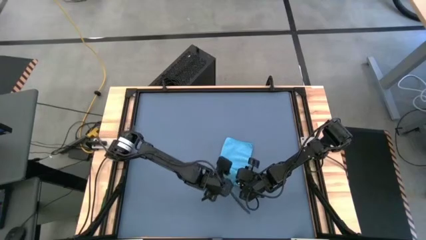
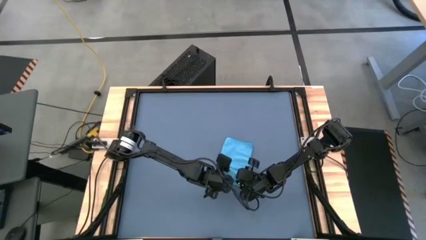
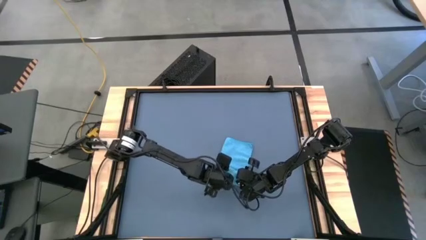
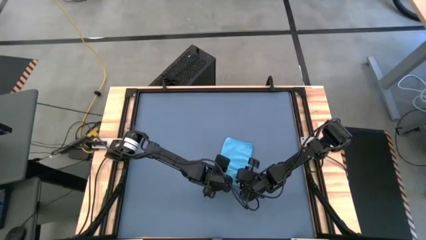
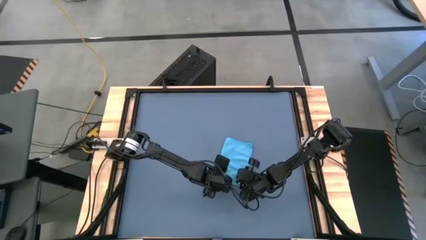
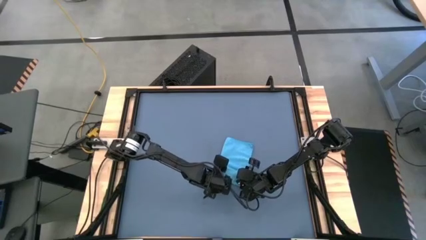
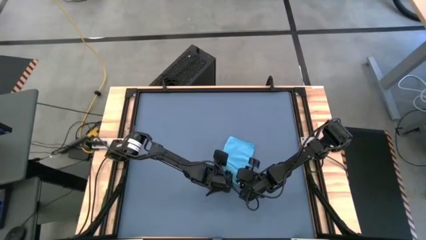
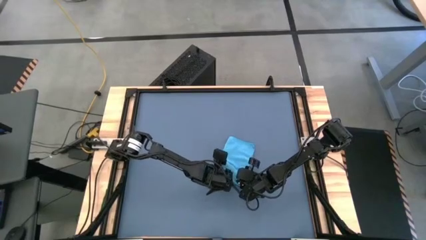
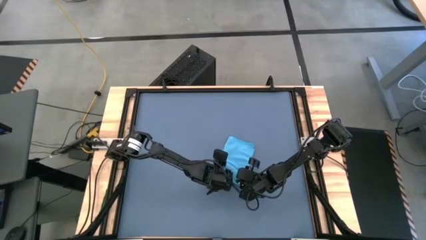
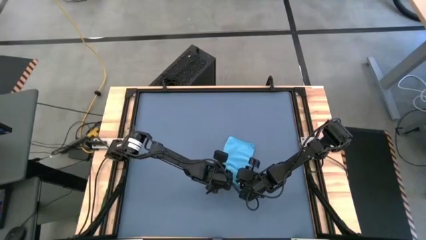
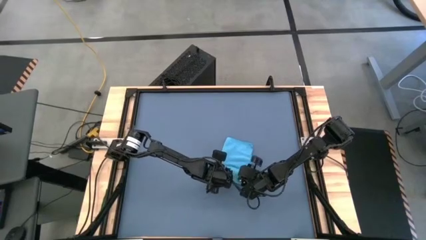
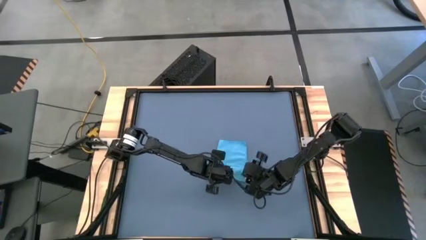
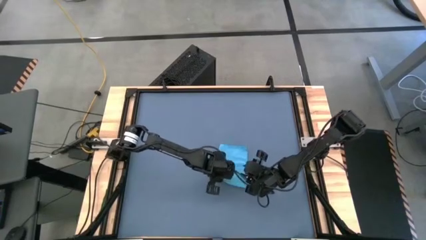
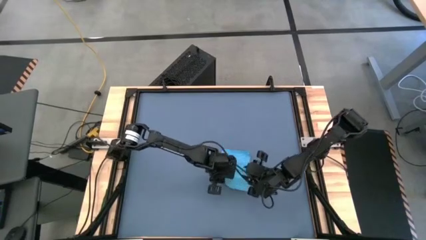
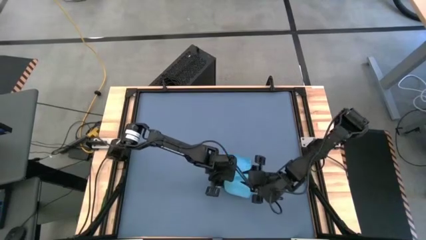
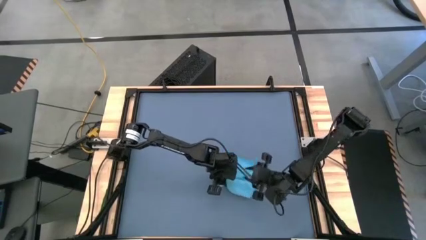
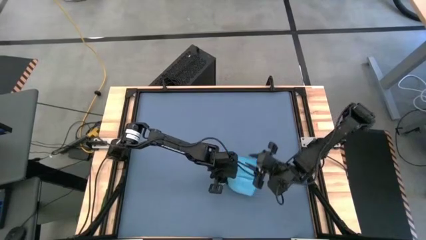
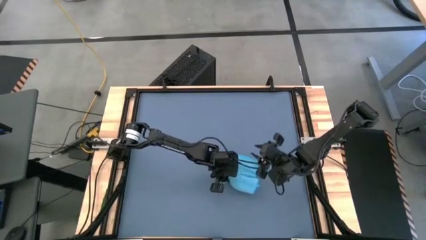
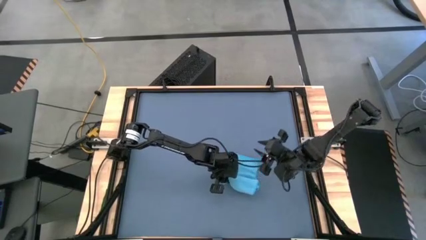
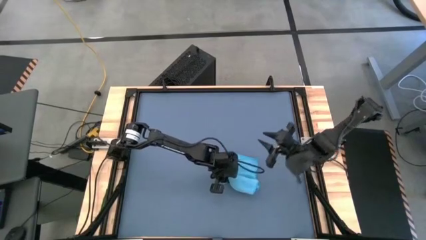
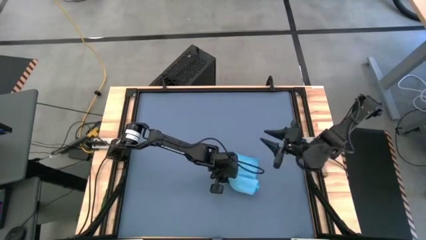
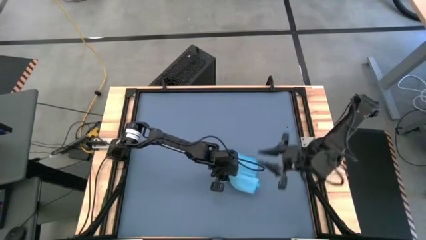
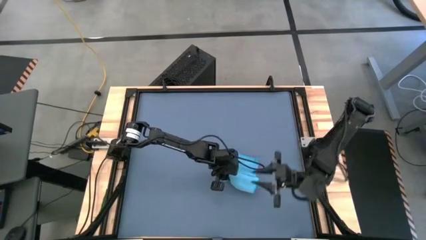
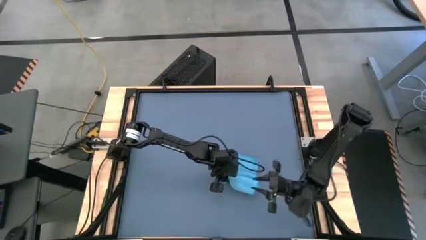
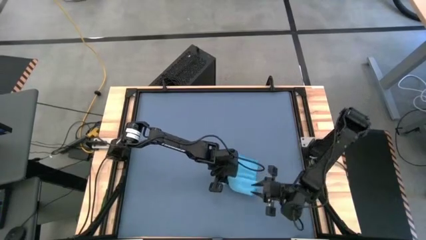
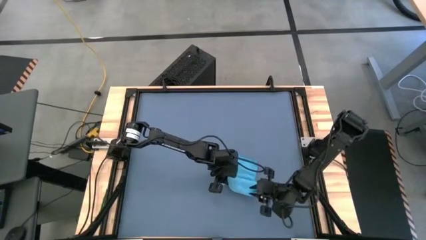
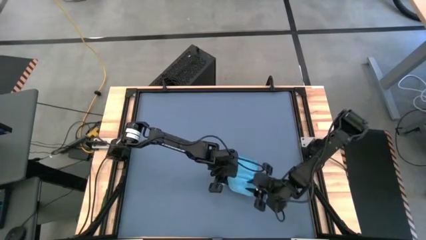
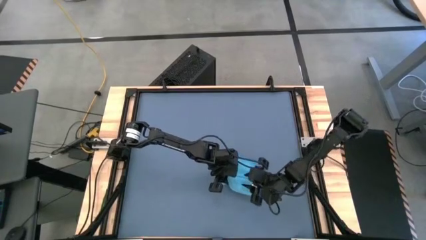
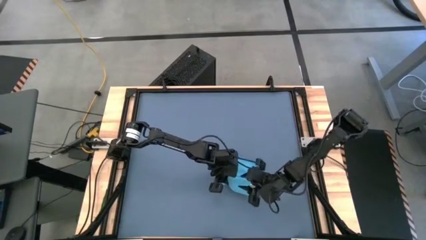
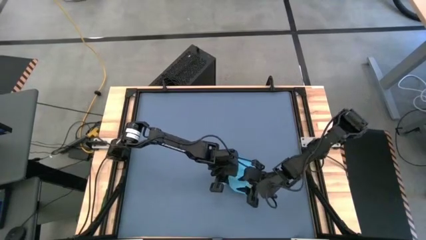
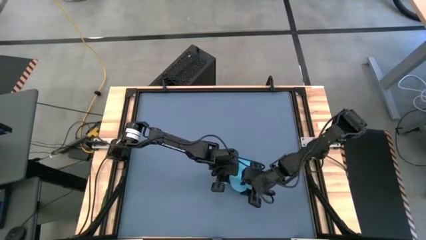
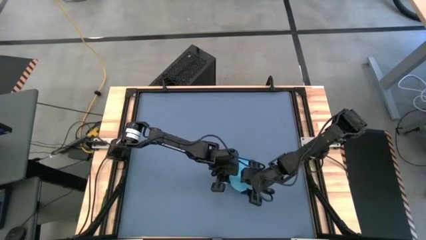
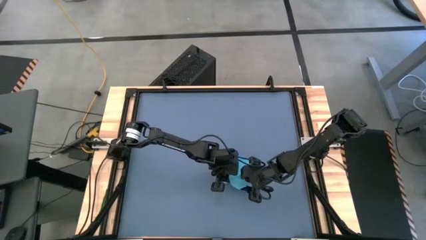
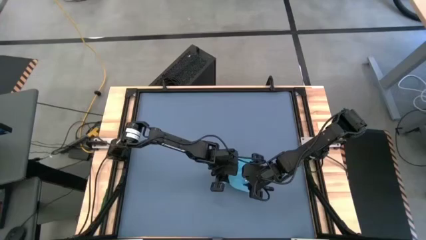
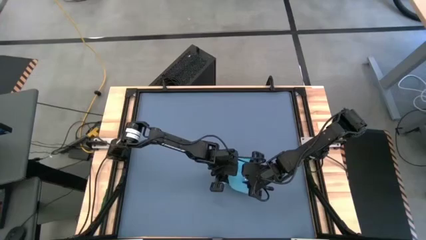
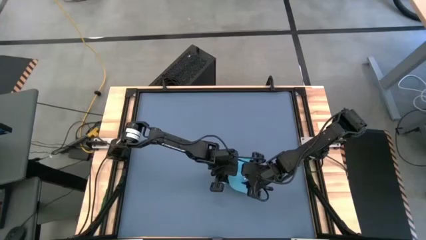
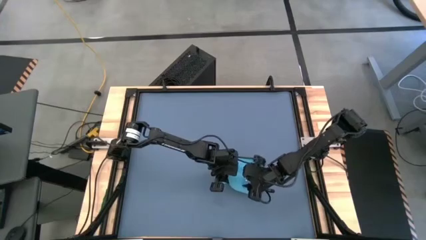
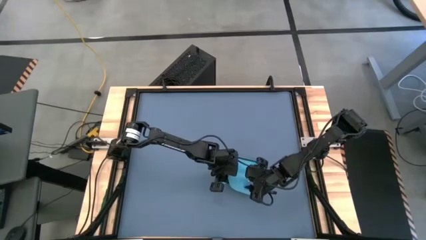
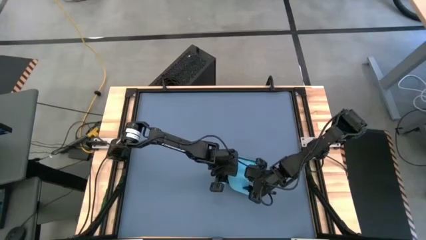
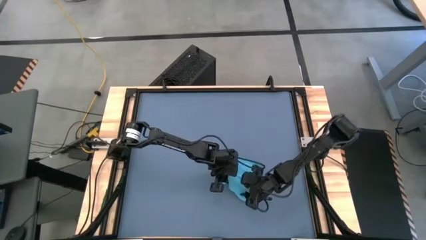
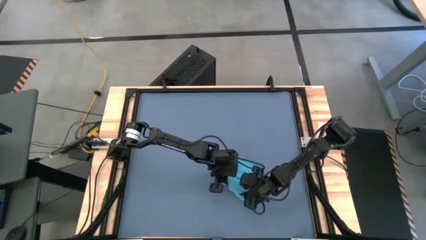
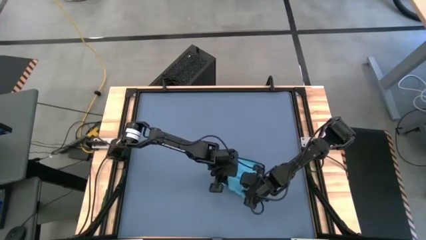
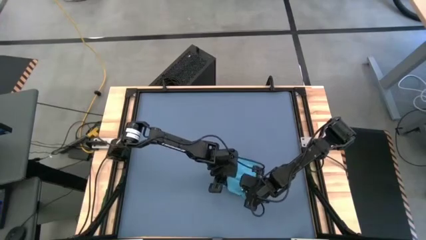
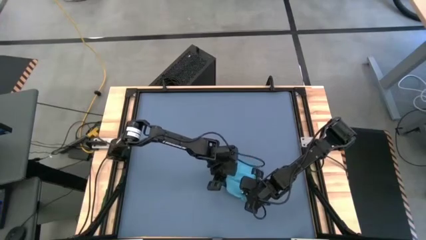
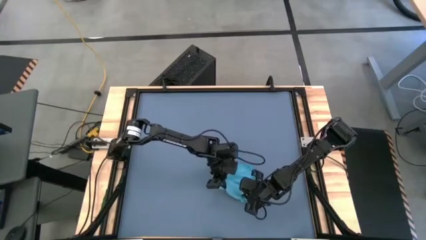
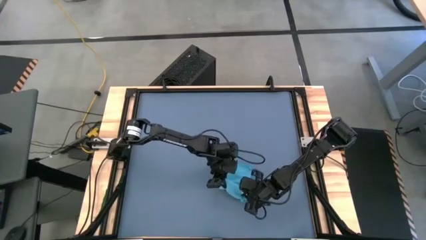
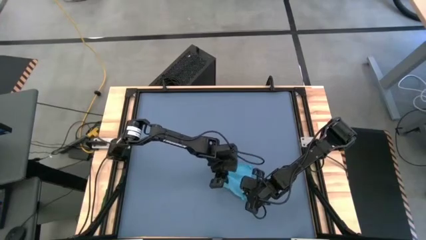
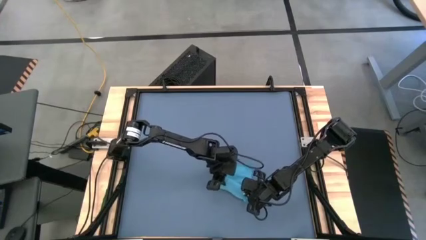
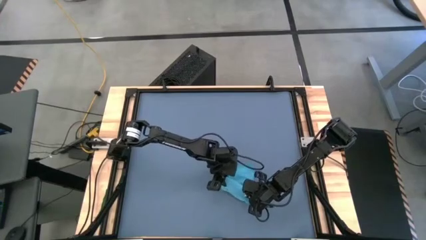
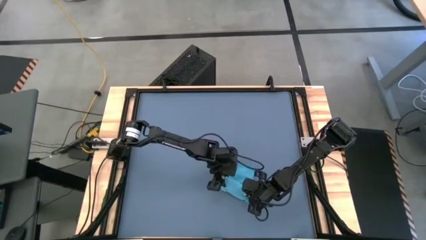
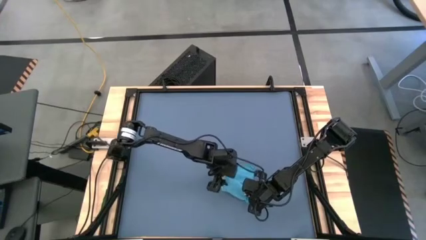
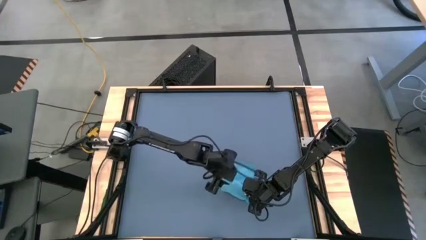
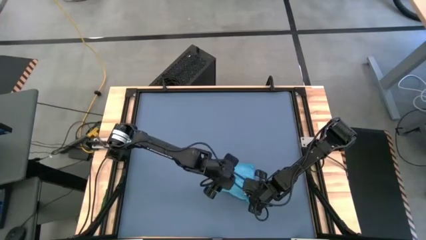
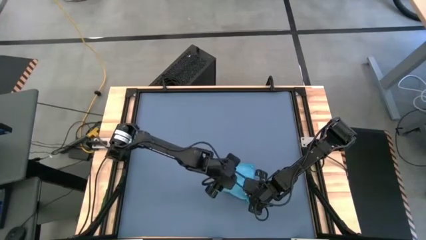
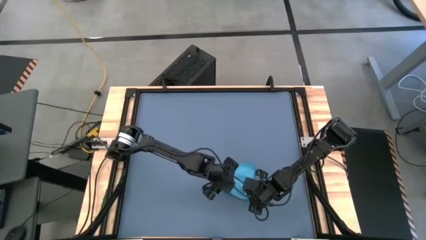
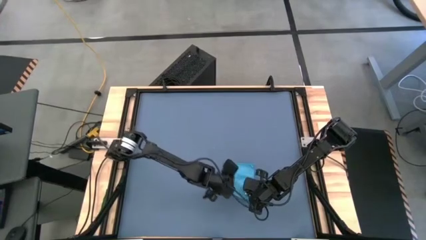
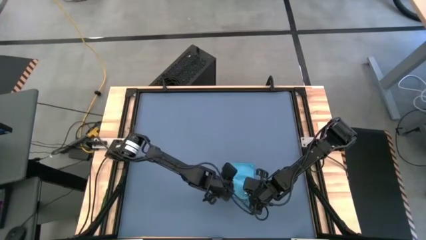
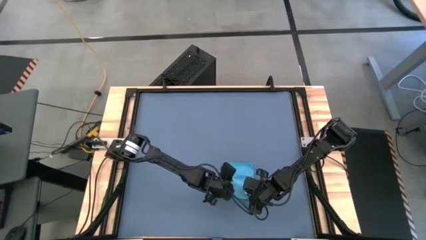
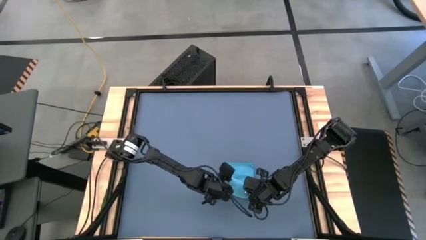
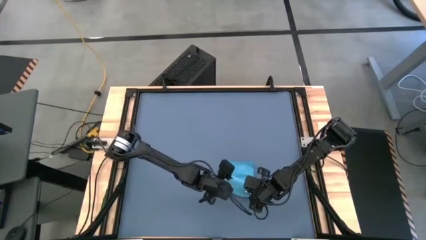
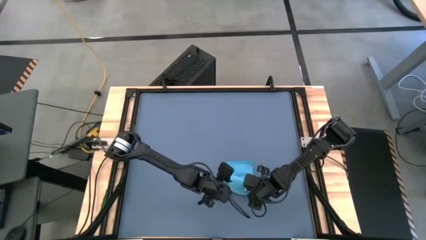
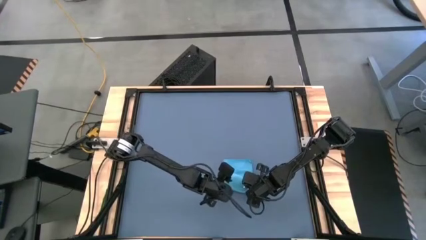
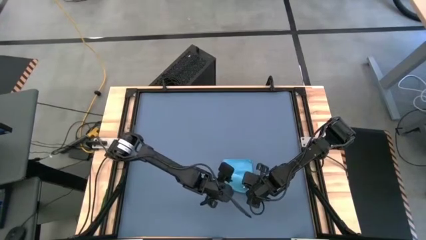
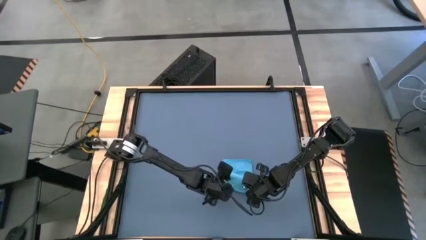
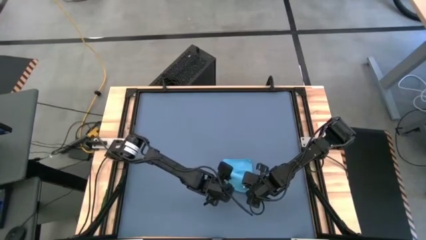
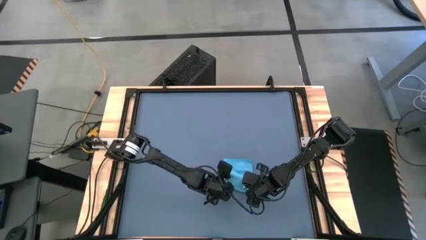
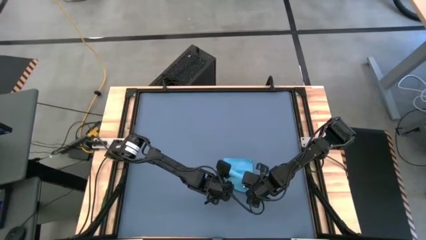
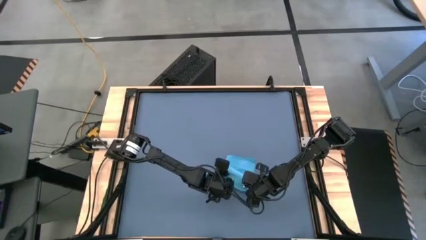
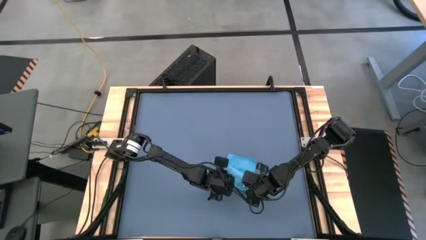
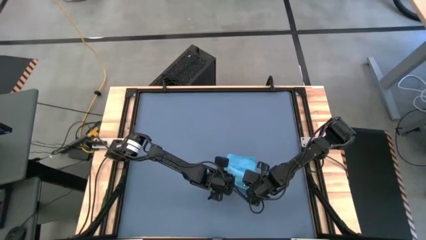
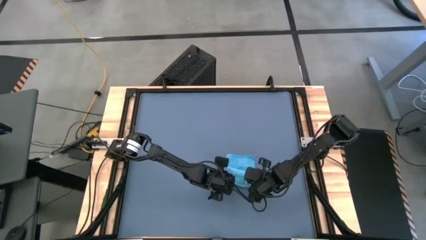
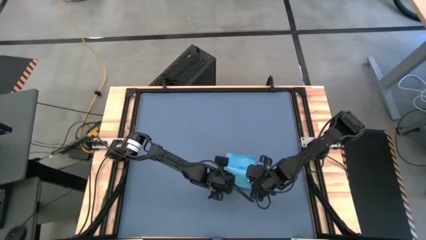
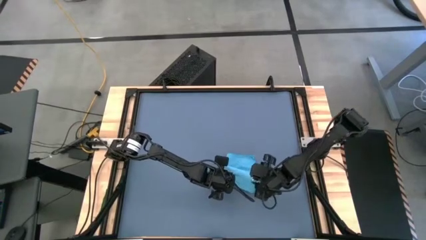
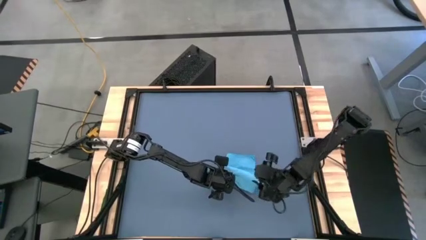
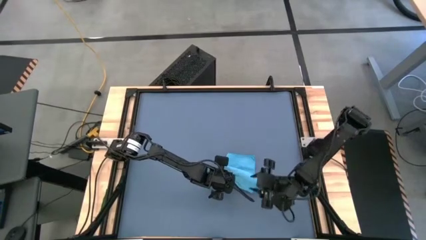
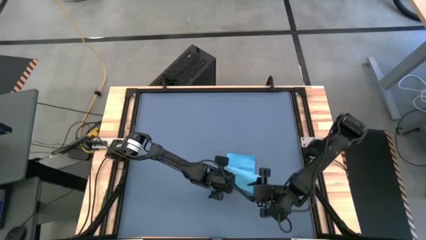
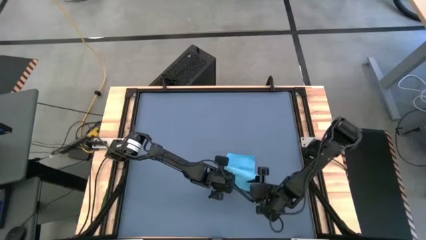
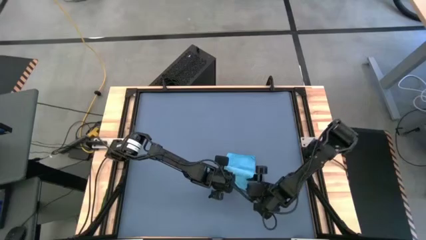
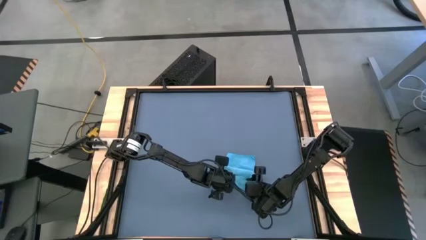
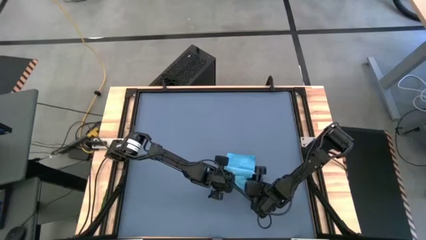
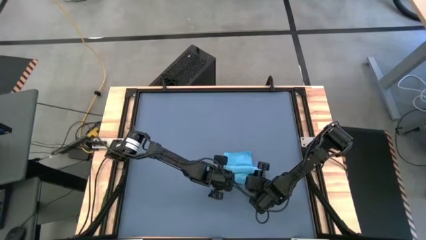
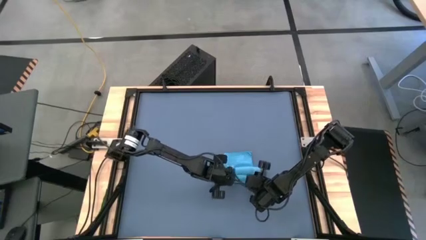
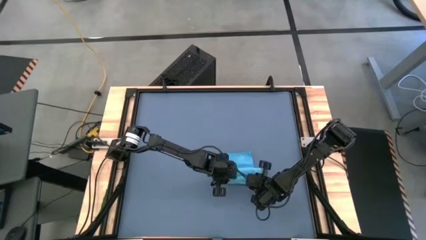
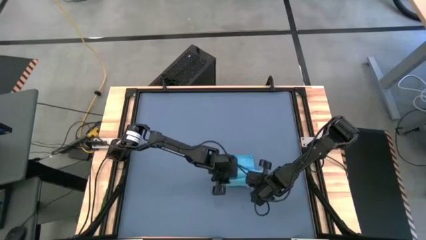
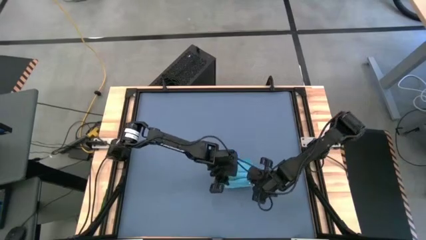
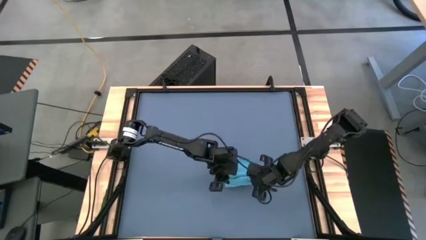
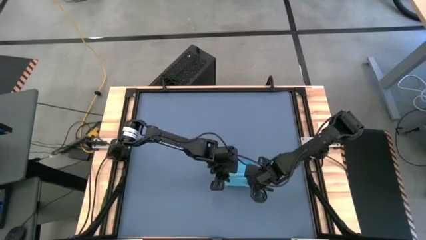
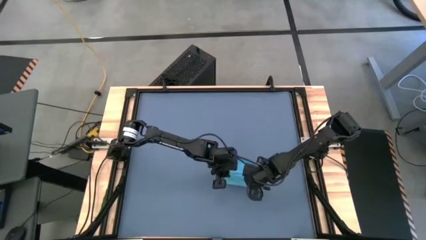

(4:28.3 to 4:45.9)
Task: Roll towel
Roll the blue microfiber towel
